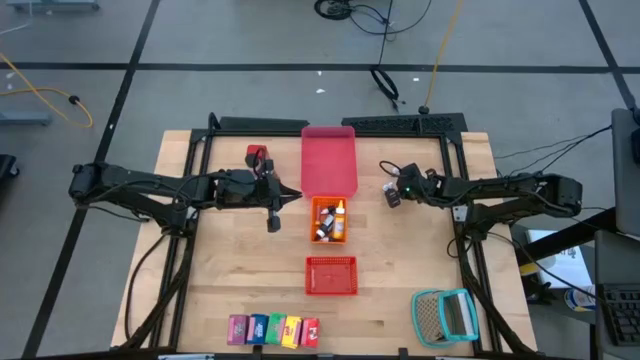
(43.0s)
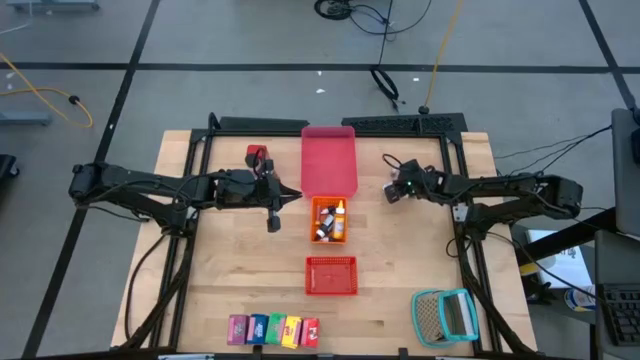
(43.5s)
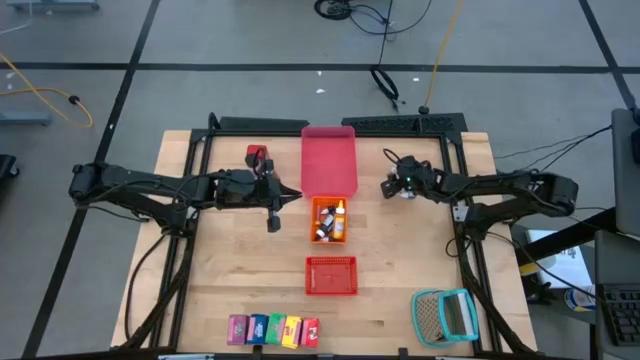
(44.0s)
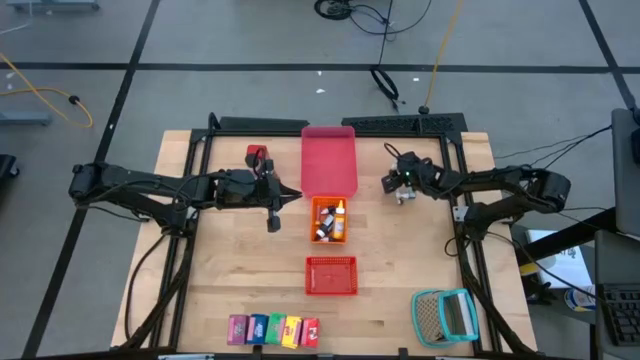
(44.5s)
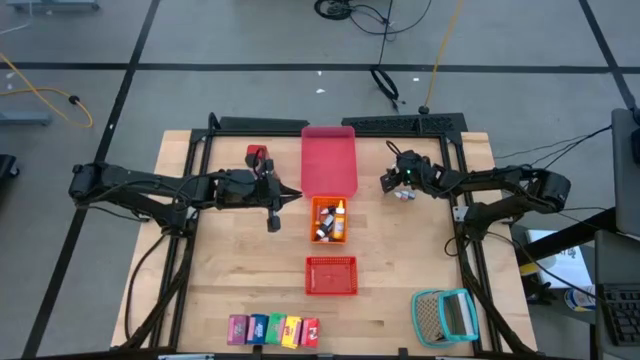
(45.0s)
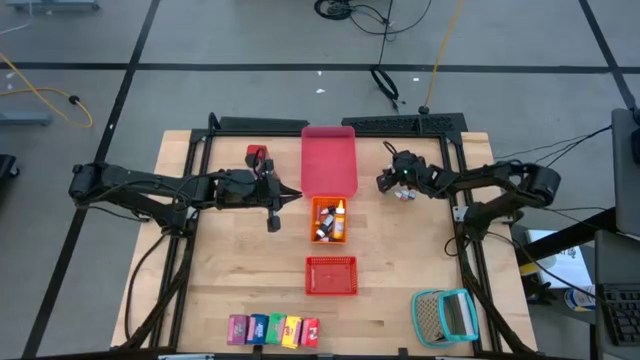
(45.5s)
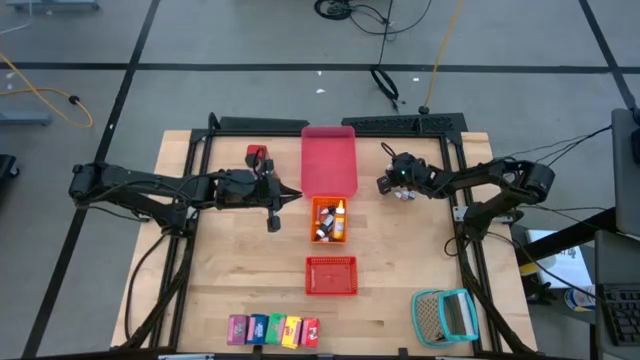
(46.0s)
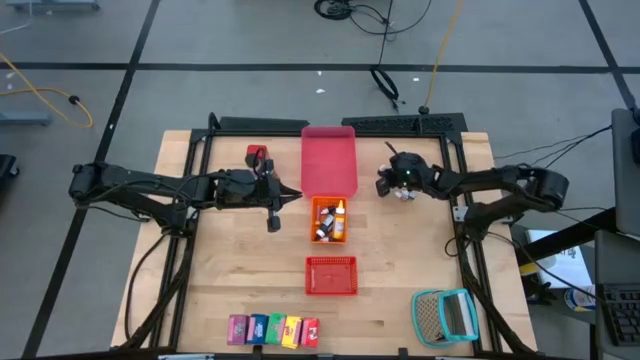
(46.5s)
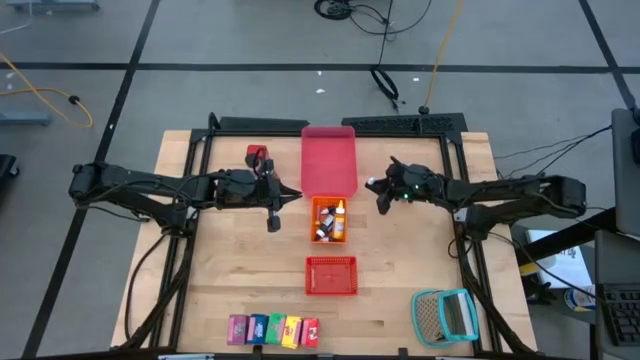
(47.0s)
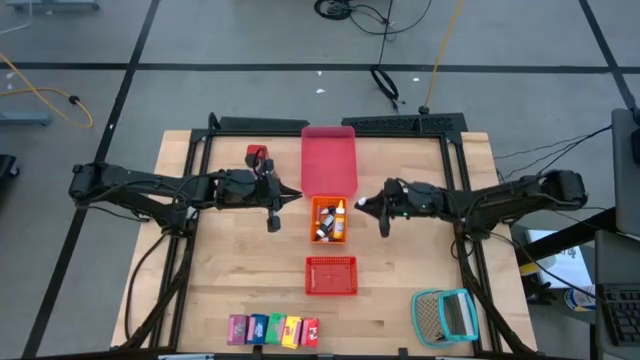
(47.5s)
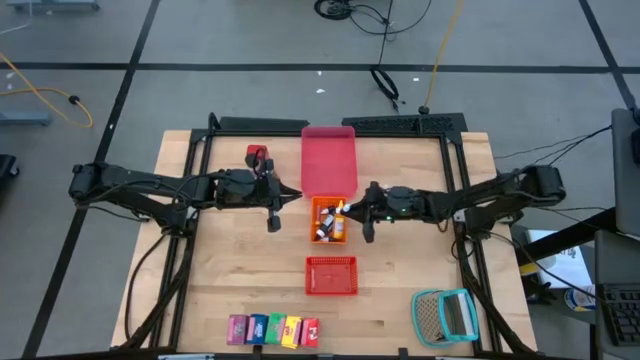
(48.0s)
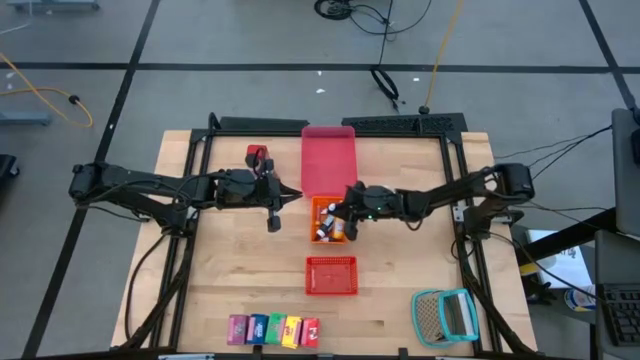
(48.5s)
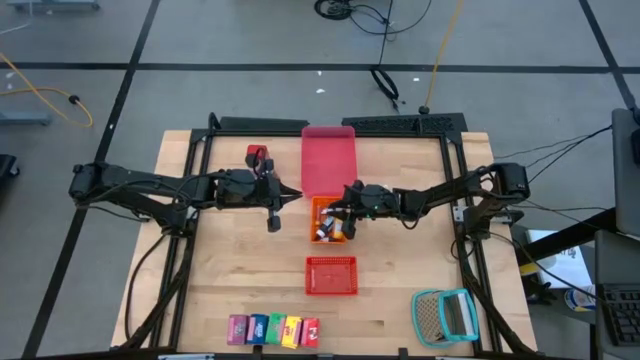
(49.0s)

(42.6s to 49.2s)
Task: Pick & Place Kitchen Items
Put the small red food coloring bottle into the orange basket

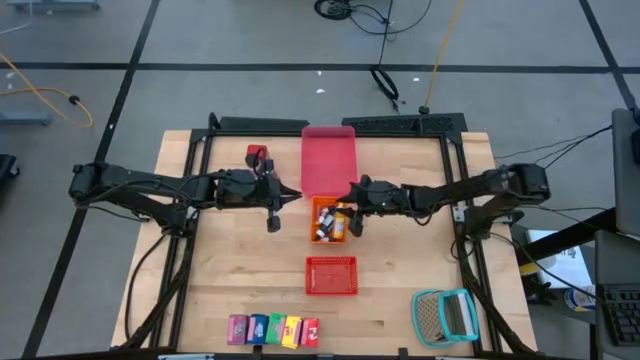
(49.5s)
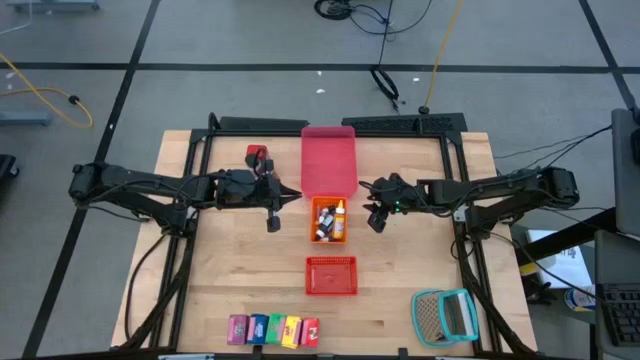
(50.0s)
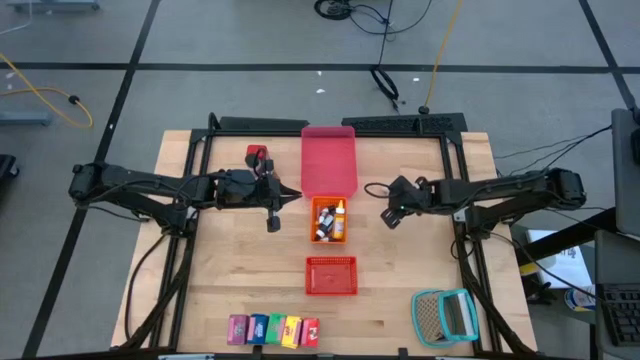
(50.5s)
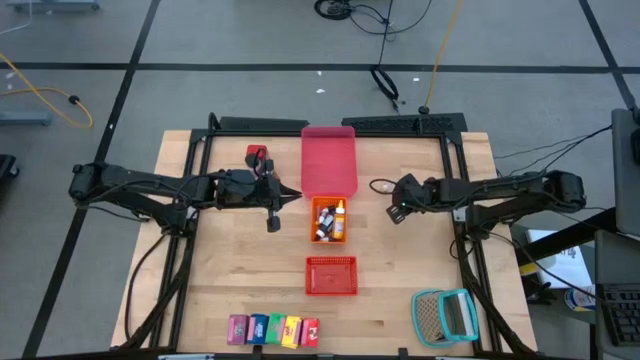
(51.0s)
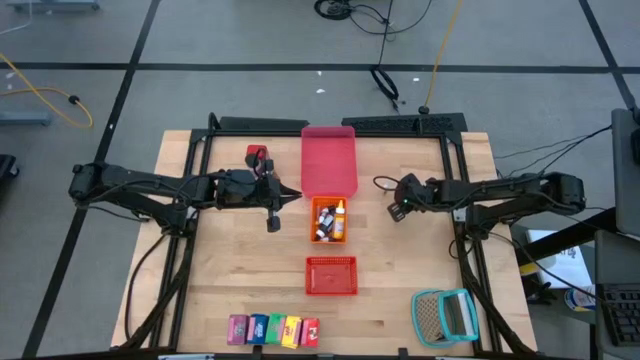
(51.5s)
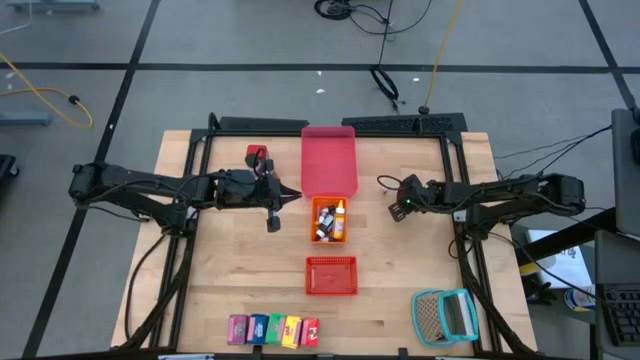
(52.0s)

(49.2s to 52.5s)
Put the small orange food coloring bottle into the orange basket

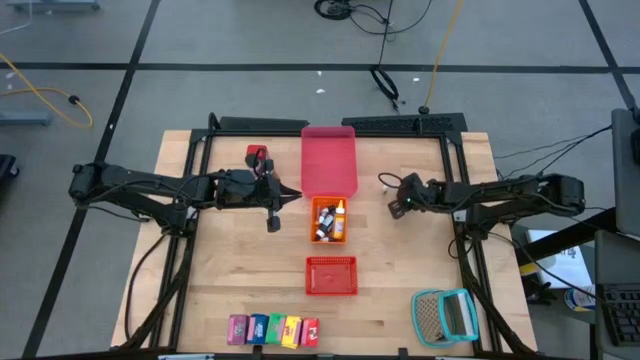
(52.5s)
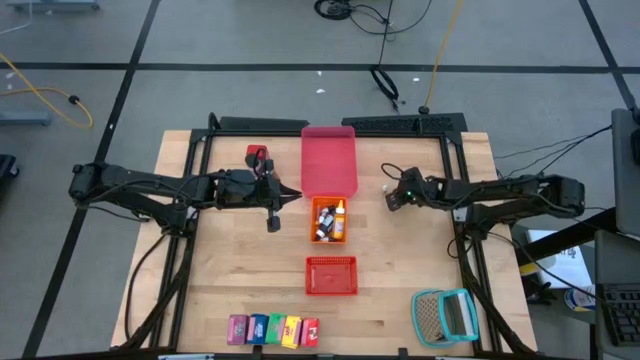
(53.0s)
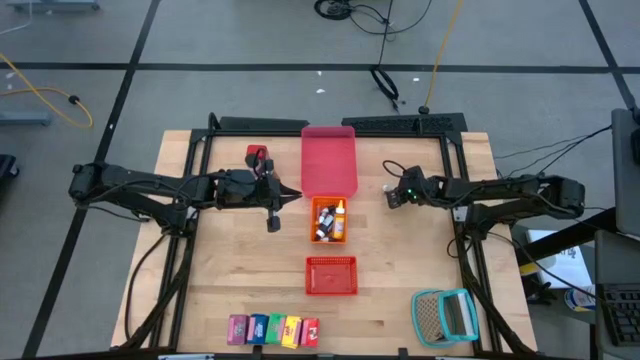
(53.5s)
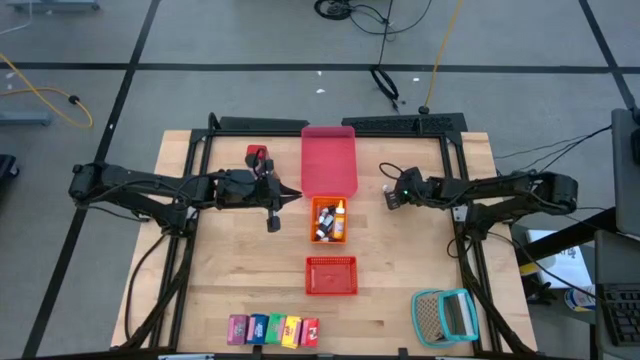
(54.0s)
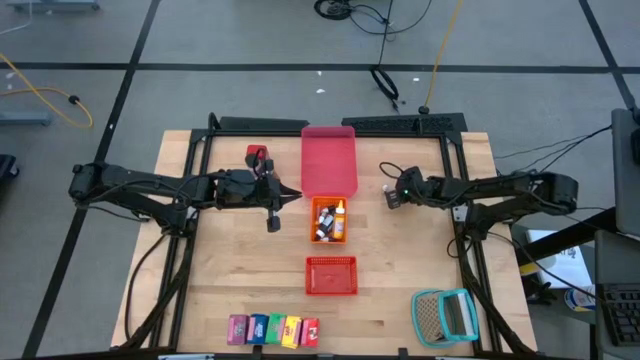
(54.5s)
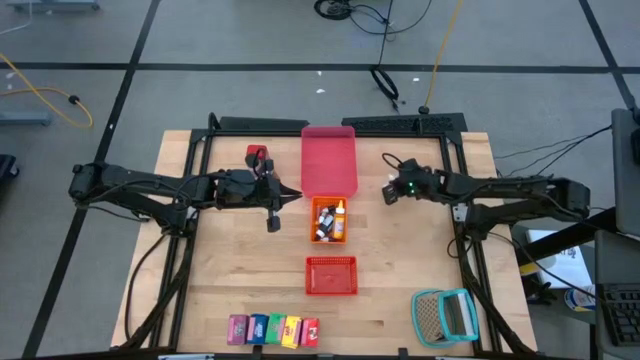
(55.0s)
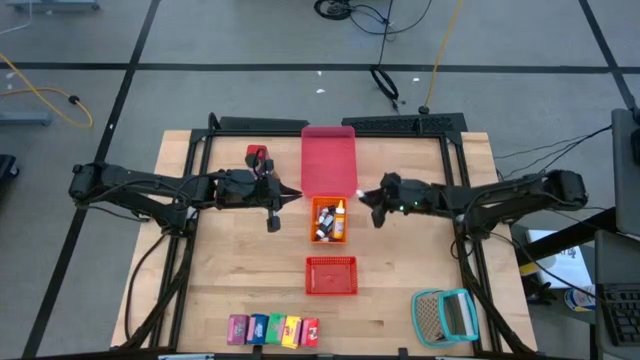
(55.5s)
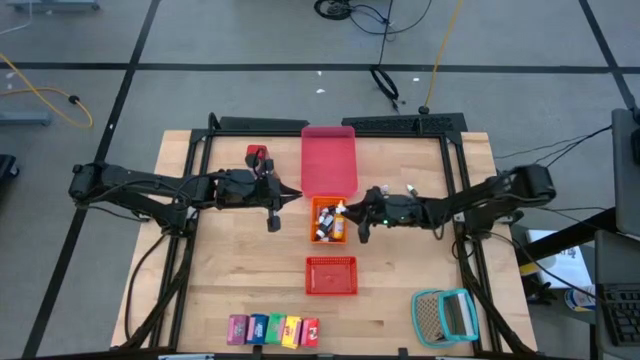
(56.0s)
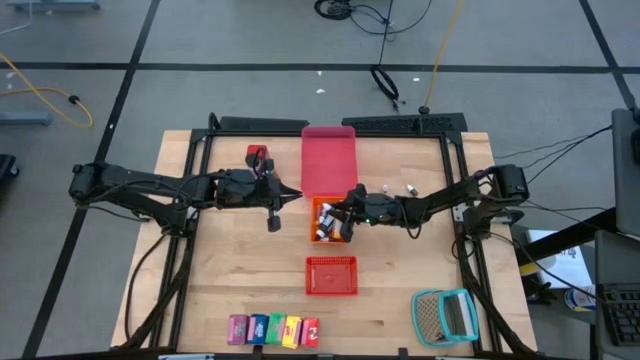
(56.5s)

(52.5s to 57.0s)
Put the small orange food coloring bottle into the orange basket

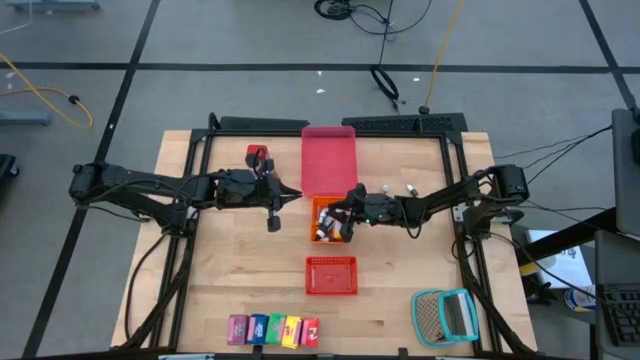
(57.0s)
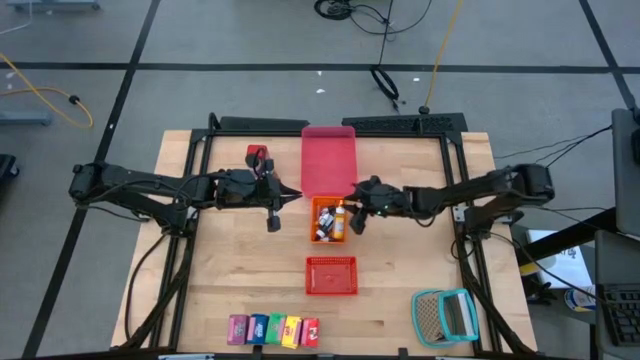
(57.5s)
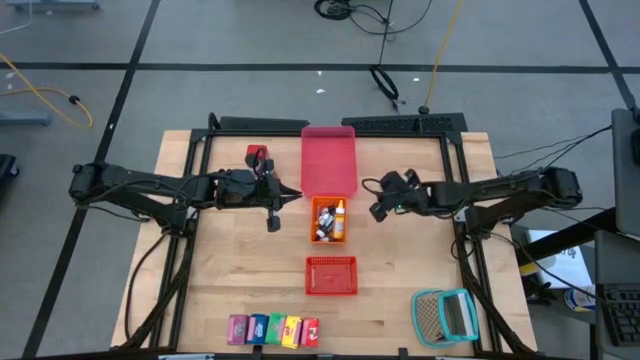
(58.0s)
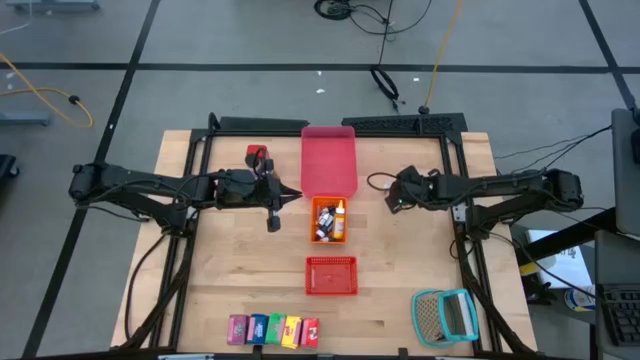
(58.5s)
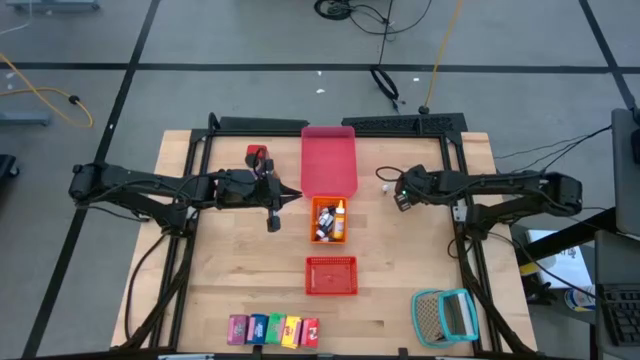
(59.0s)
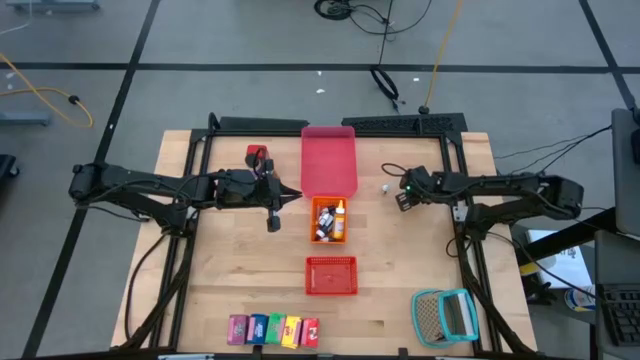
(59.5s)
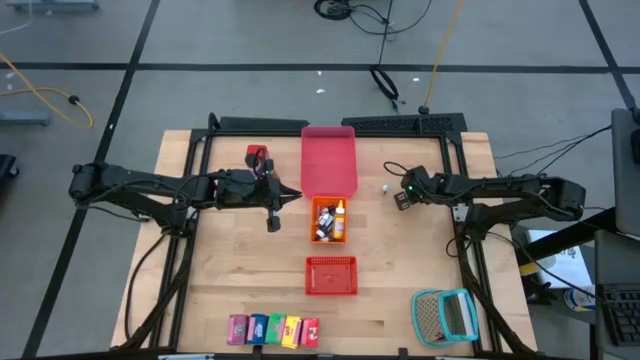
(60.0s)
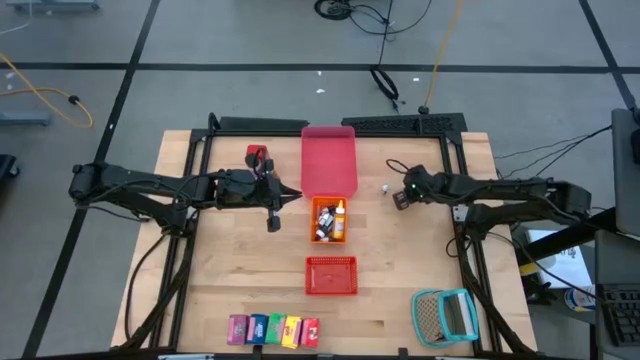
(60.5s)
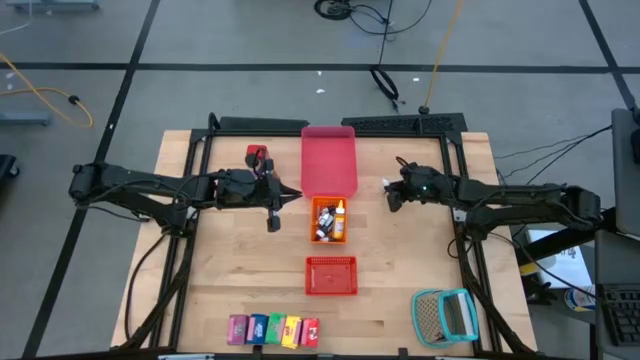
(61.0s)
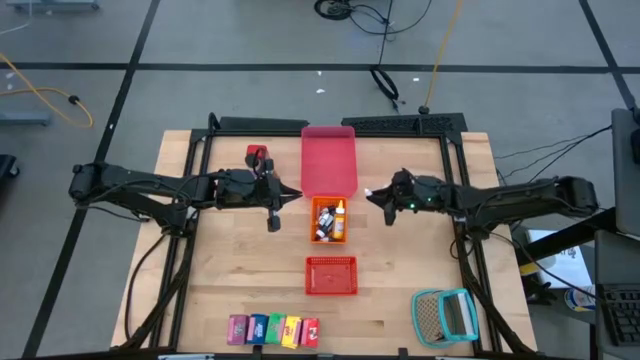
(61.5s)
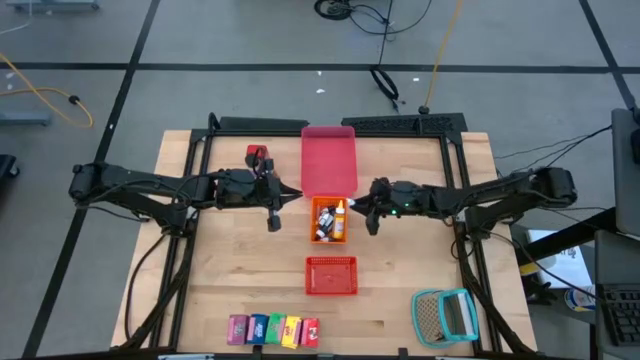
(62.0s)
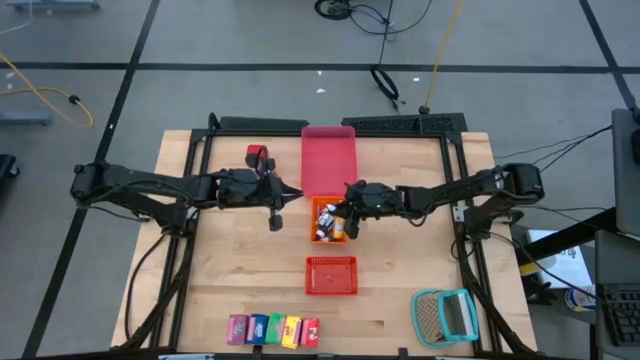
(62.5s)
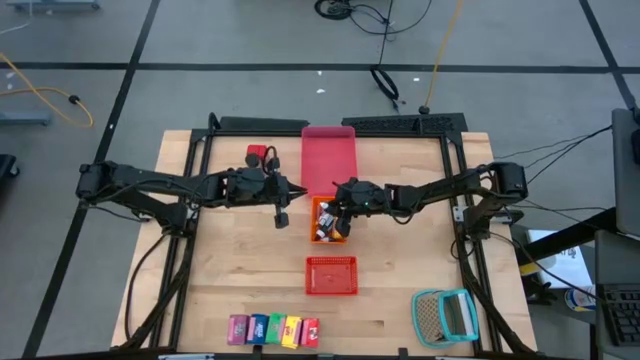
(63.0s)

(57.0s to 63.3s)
Put the right small brown food coloring bottle into the orange basket

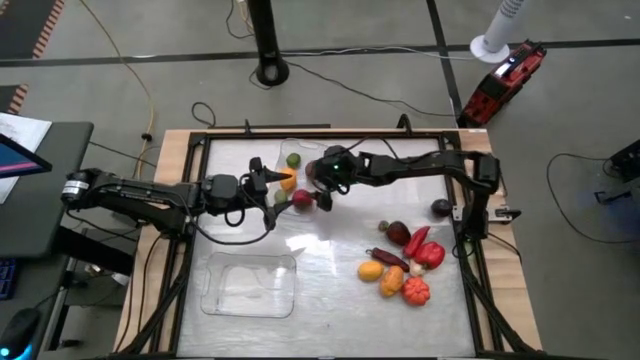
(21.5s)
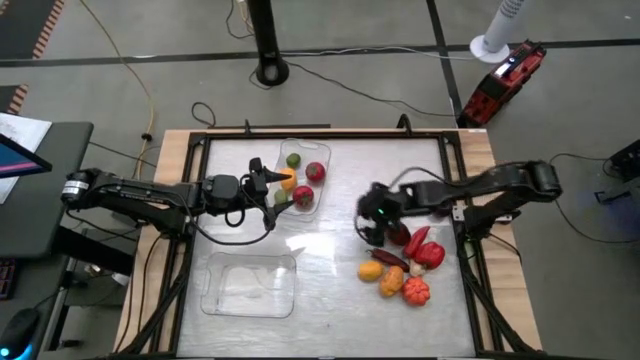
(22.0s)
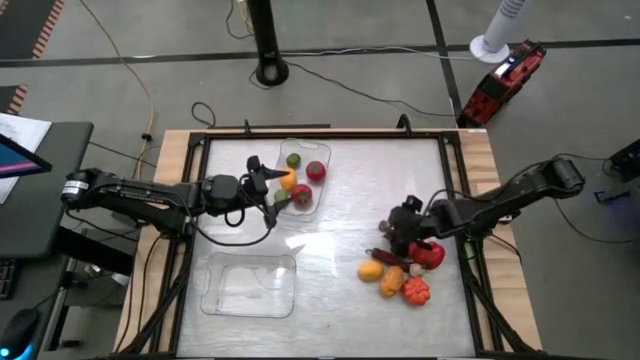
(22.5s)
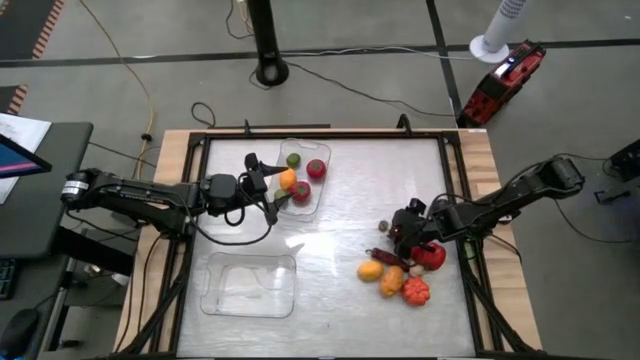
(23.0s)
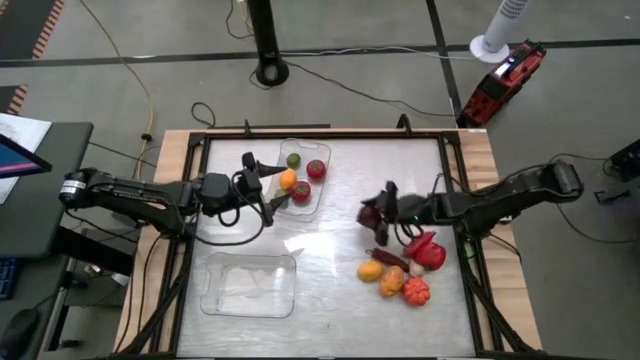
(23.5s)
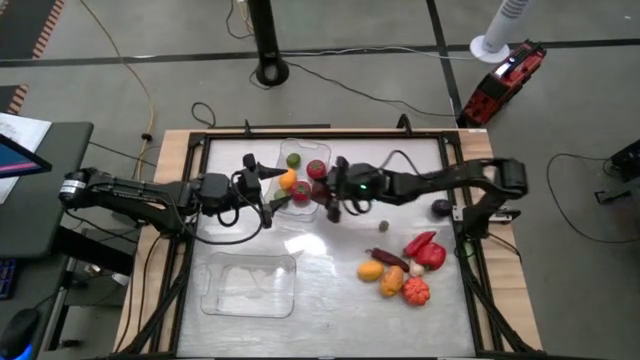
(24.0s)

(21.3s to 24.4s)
Task: Sort produce into baskets
Put the apple into the top transparent bin
